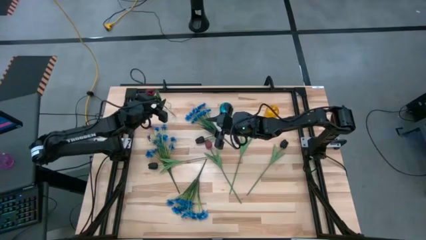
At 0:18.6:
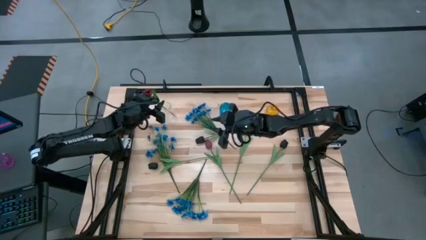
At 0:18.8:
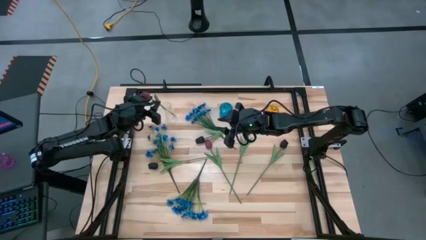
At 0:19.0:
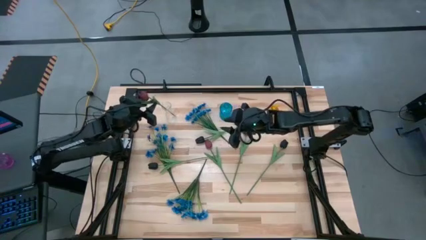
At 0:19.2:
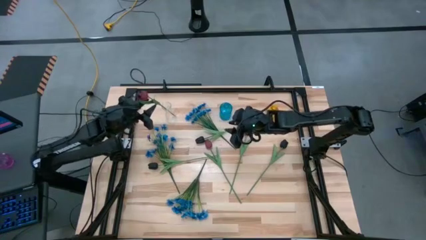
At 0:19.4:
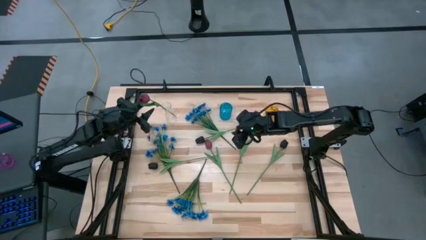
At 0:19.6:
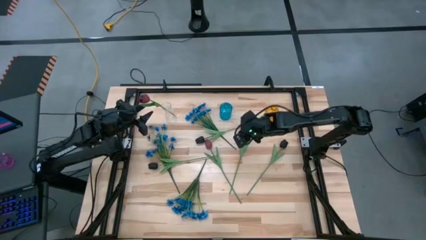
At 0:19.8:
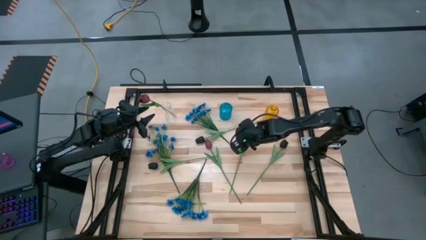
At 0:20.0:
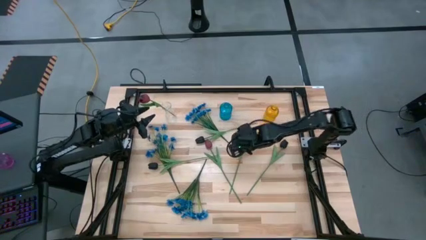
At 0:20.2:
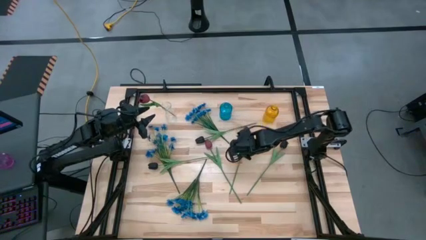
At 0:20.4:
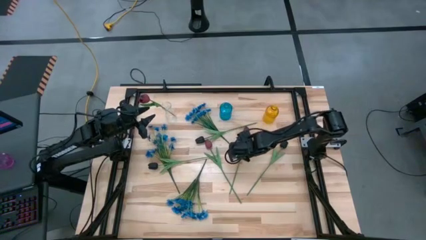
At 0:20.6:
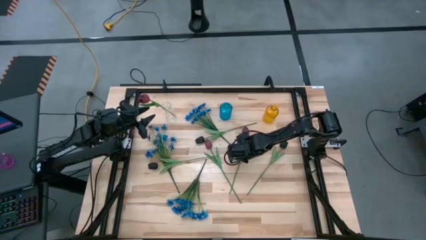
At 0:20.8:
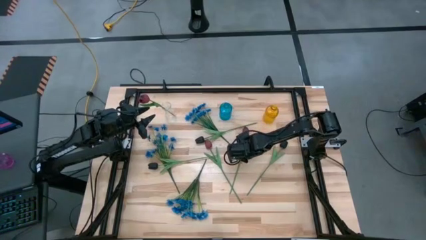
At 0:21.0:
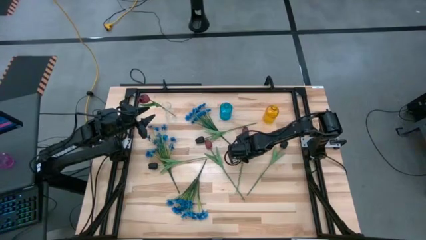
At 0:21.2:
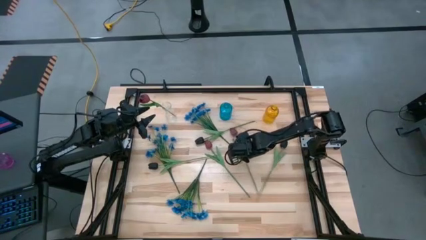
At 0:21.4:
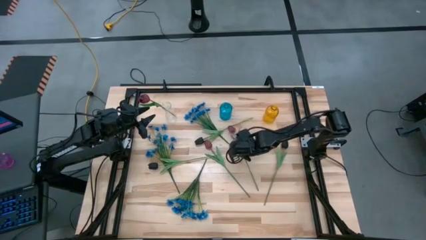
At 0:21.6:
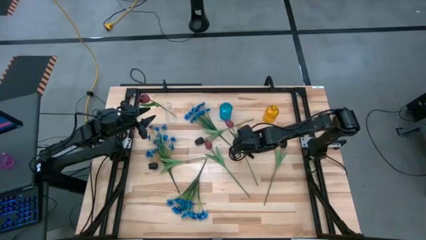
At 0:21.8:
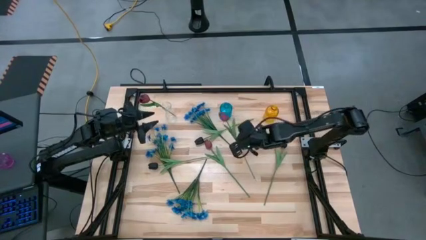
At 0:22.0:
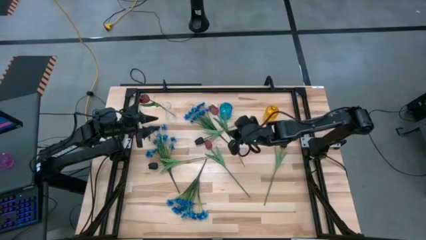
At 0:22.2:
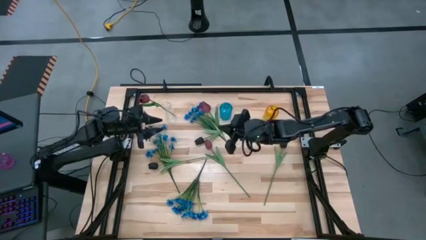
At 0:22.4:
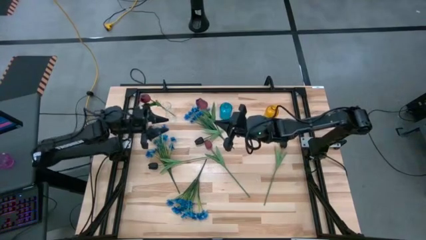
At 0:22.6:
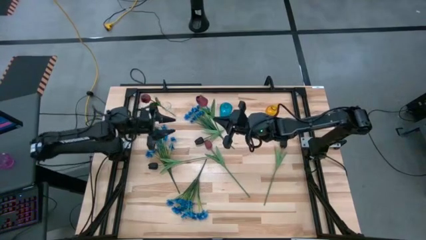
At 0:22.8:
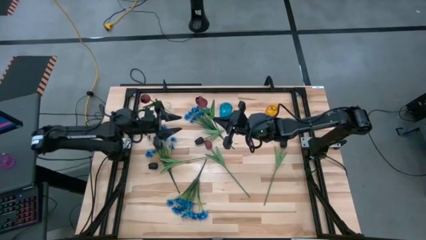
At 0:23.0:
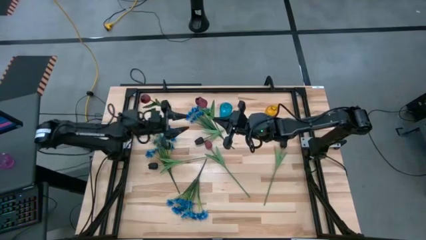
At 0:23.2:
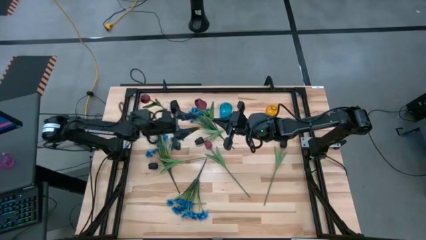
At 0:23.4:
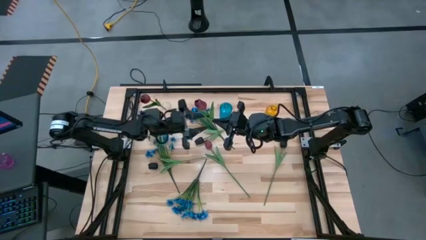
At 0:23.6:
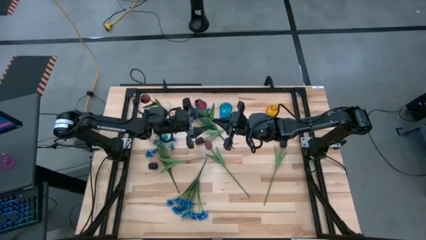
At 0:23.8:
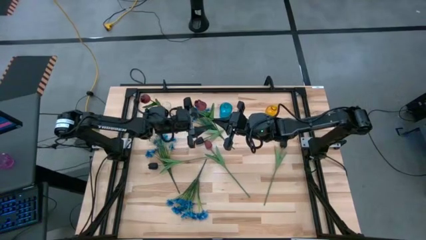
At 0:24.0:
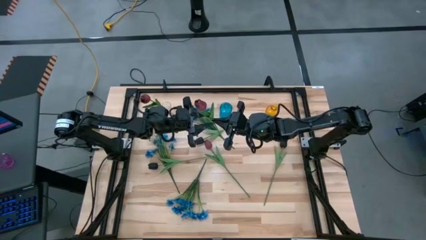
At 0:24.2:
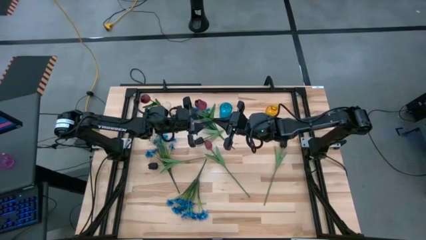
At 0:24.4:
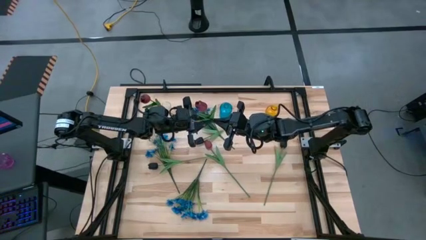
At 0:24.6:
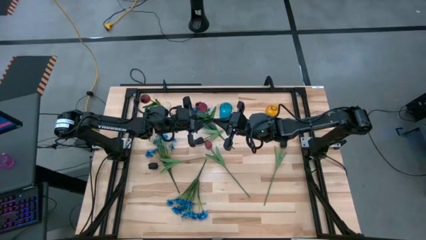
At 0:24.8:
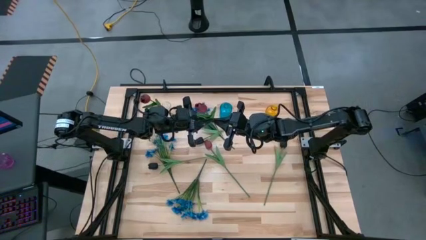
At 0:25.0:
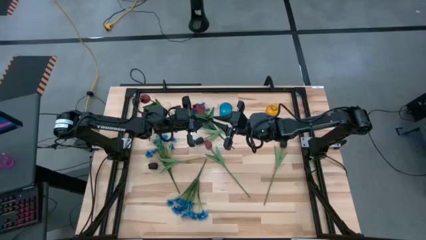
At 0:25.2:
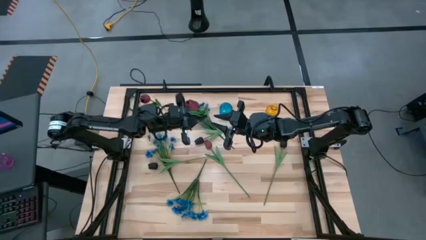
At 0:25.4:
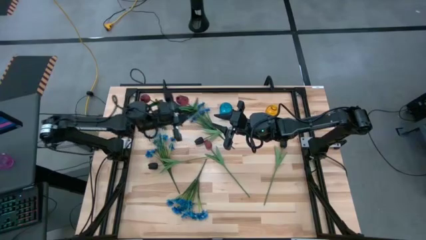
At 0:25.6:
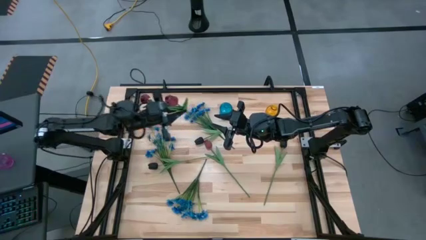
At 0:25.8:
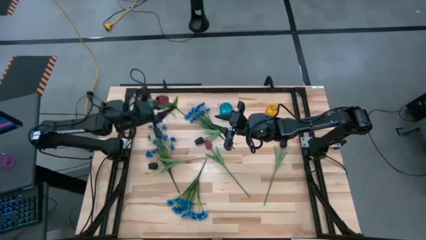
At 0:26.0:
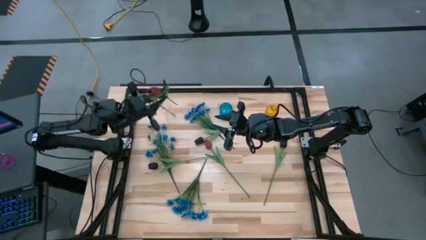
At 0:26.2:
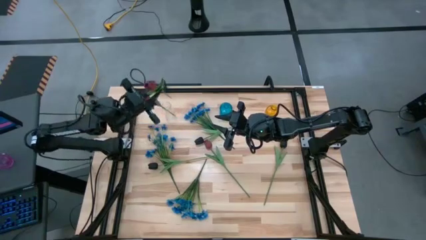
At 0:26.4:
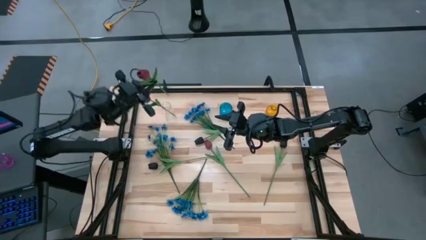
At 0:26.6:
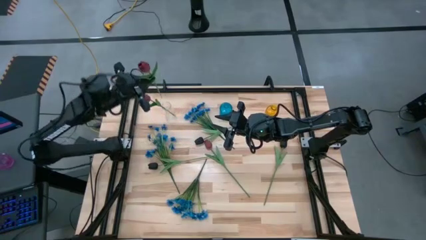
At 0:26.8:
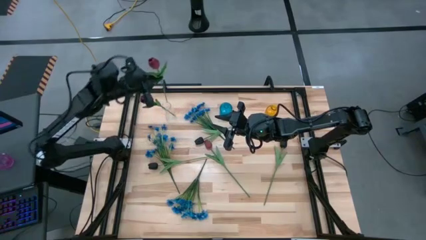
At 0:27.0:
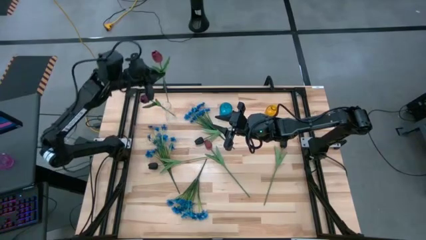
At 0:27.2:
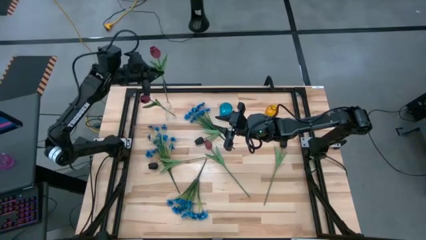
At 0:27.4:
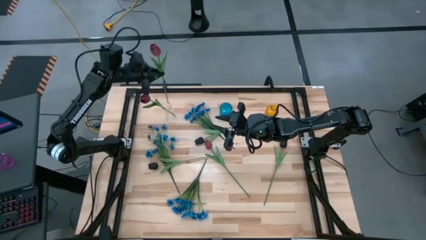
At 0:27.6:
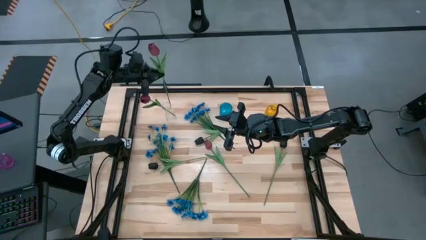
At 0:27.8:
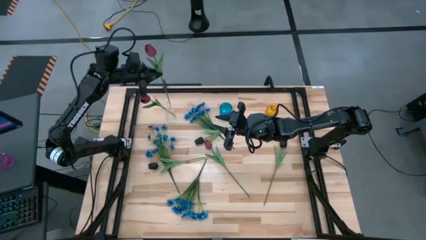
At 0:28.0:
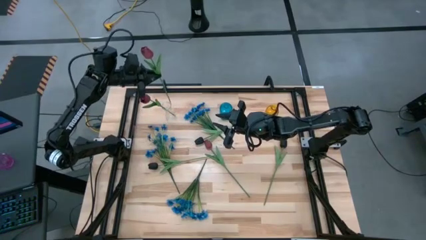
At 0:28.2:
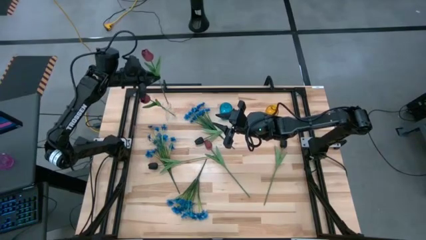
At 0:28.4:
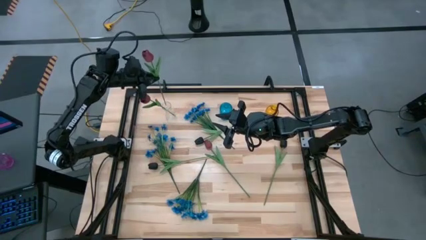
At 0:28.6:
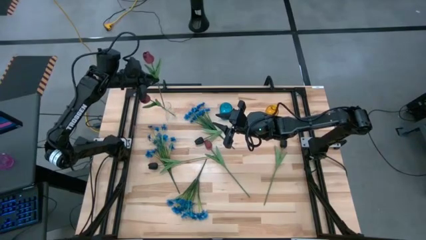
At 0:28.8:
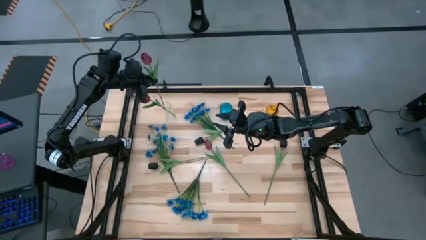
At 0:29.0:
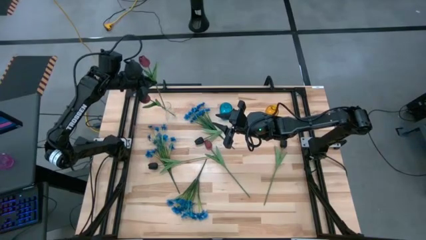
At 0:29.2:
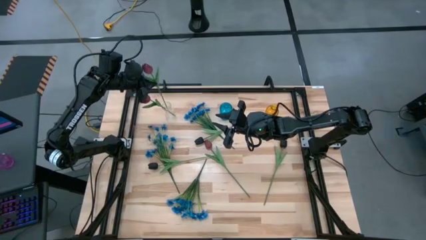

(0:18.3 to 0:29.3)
Task: Sort flowers into vase by color
Put the right red flower into the transparent vase

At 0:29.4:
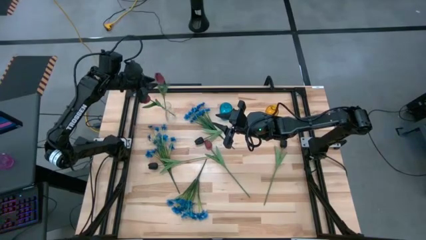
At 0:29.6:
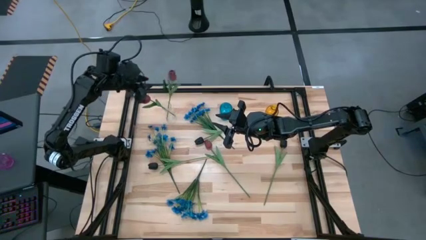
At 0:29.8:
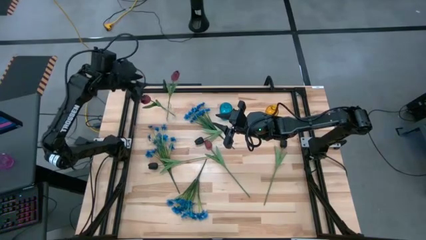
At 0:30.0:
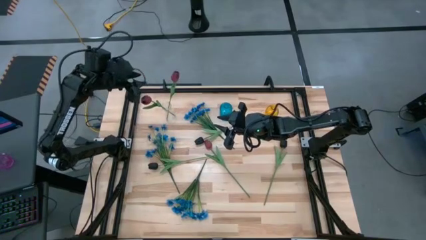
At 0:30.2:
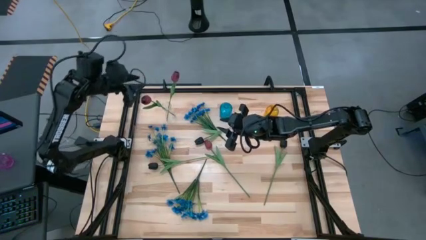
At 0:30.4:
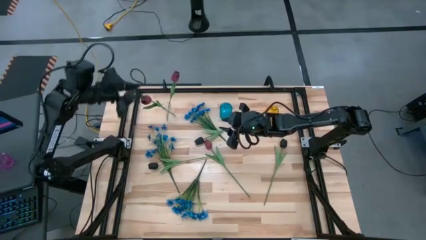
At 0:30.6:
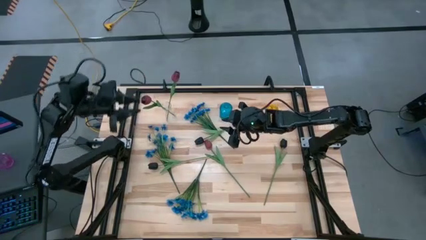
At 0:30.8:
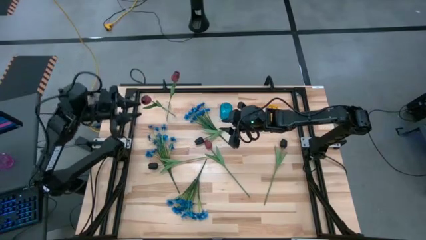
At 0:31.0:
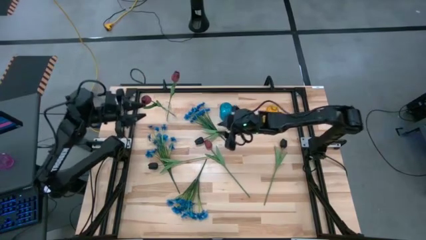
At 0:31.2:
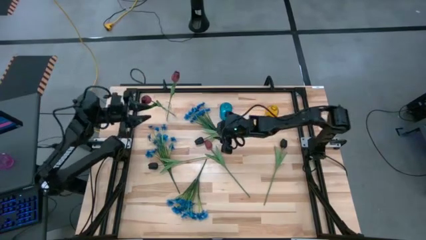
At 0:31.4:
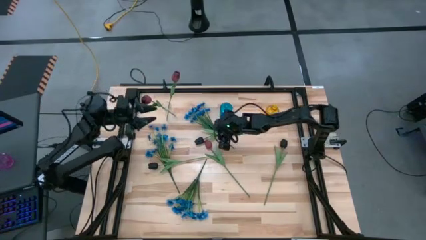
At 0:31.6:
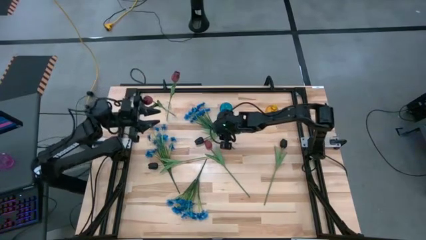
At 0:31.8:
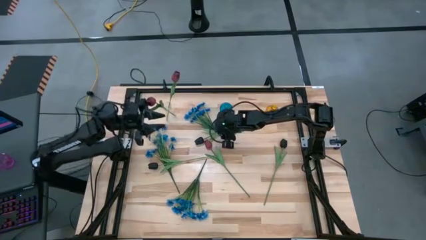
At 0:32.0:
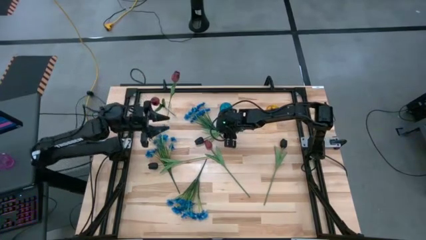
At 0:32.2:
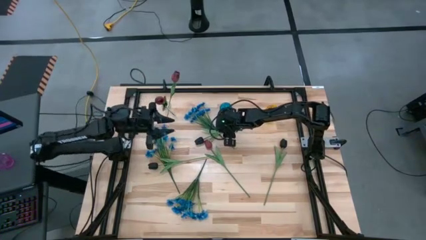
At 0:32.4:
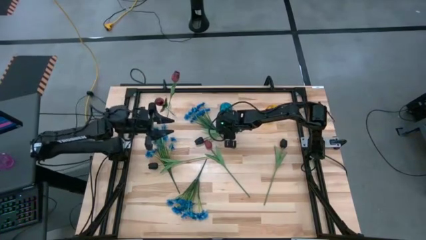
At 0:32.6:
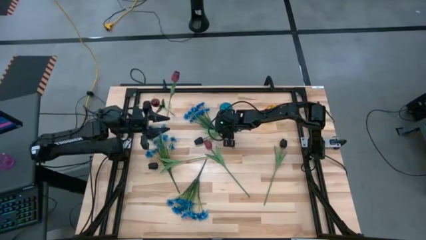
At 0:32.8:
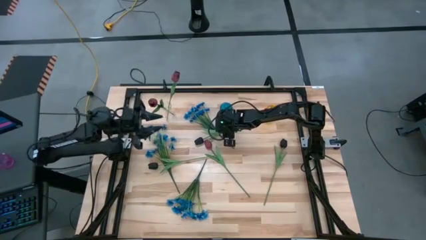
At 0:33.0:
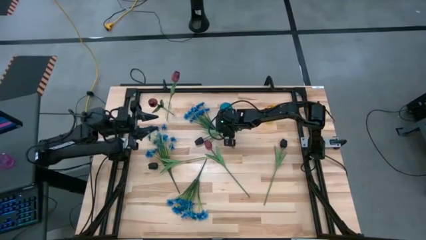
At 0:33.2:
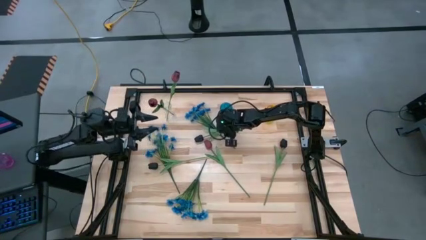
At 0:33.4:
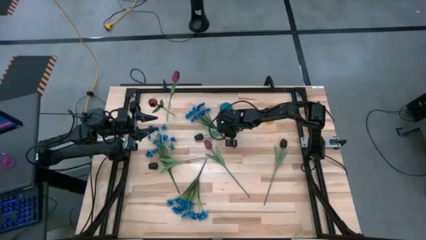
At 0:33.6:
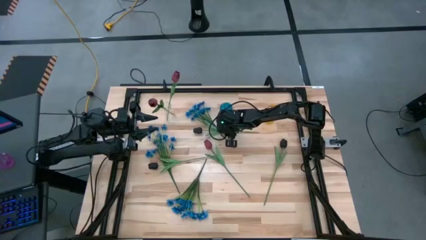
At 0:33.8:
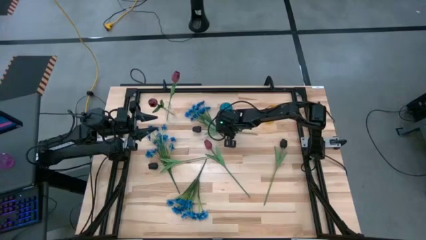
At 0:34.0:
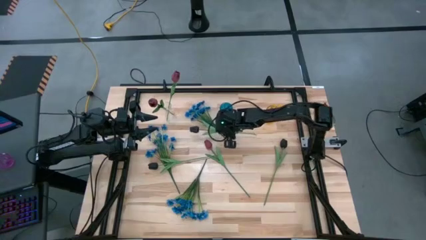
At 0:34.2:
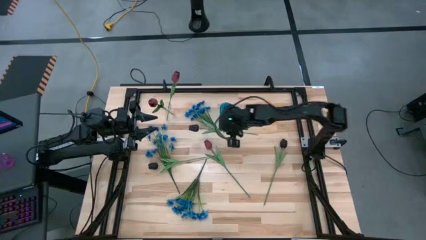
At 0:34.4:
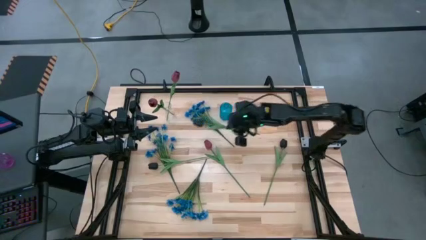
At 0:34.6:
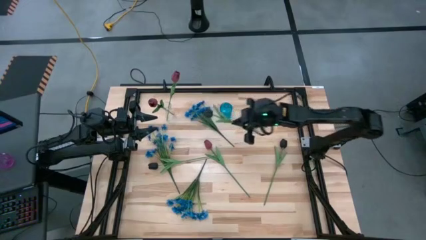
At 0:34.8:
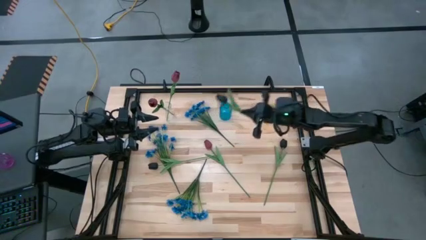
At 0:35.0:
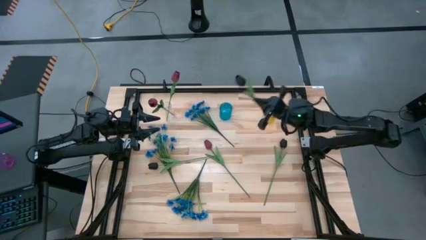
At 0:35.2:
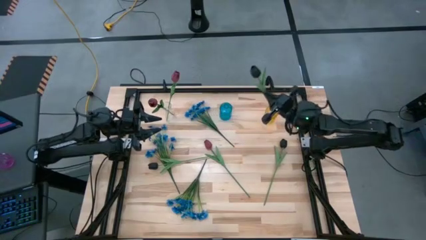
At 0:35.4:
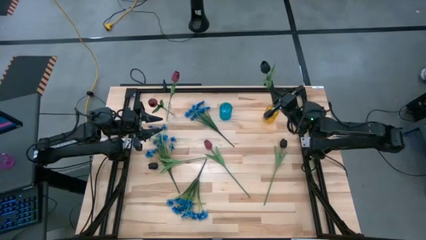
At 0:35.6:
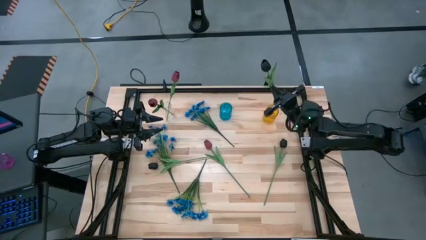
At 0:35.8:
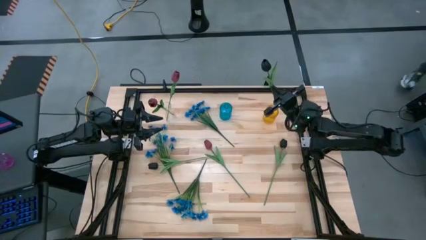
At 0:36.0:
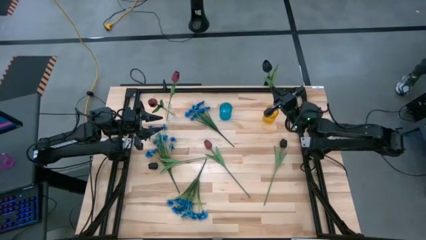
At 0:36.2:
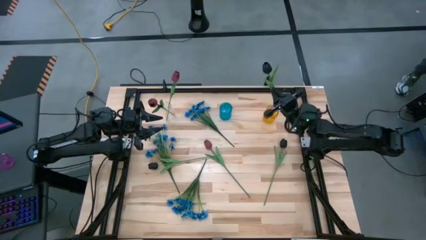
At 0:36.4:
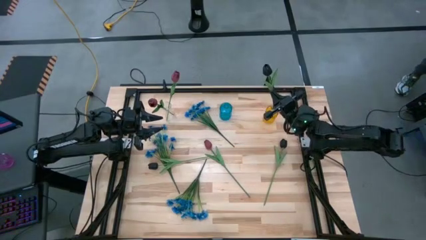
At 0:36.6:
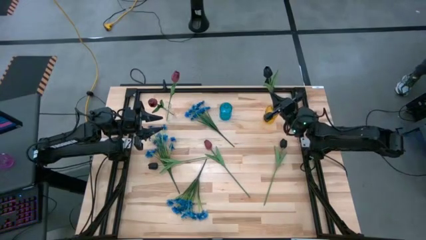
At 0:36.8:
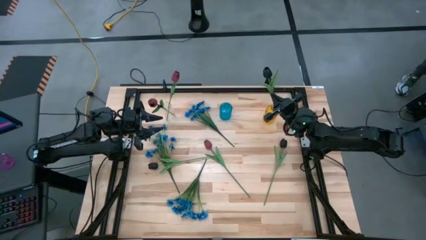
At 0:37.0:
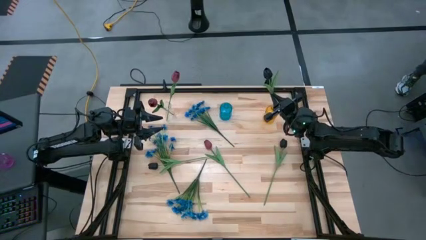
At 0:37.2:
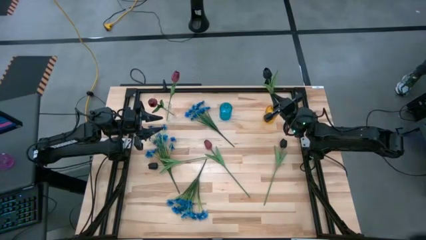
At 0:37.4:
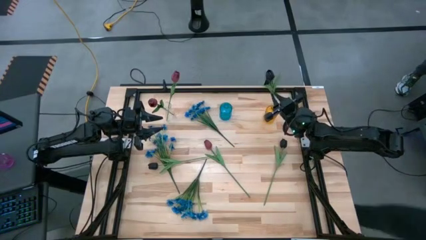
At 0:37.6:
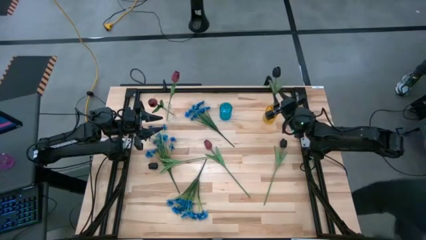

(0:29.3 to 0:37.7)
Put the middle black flower into the yellow vase
